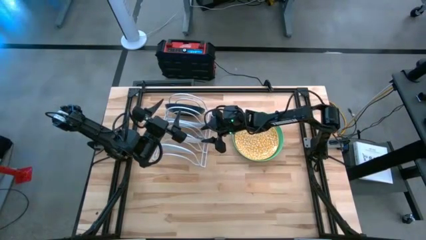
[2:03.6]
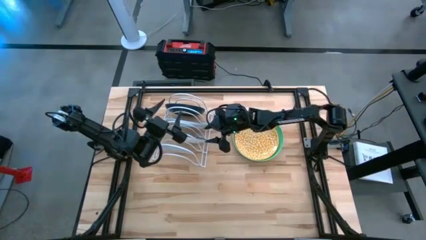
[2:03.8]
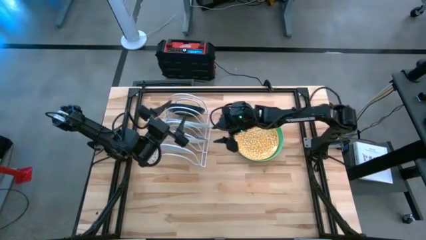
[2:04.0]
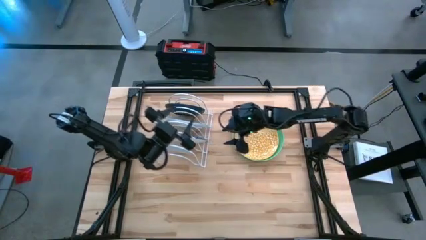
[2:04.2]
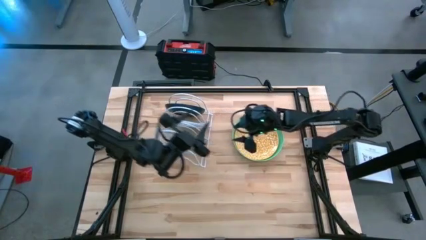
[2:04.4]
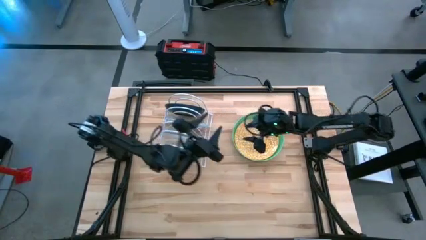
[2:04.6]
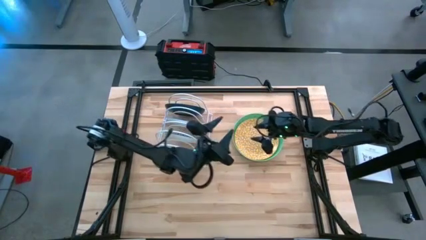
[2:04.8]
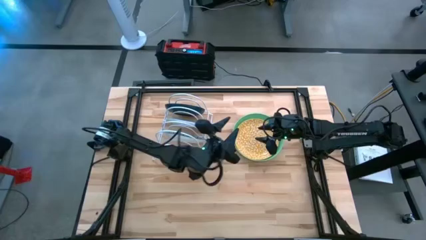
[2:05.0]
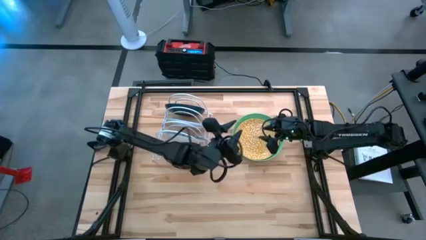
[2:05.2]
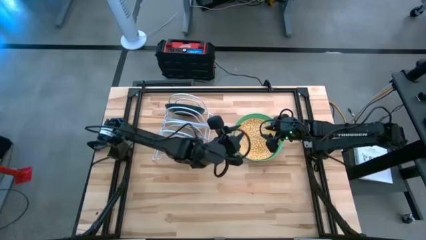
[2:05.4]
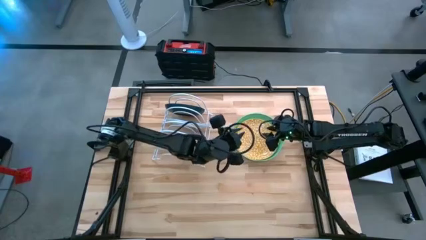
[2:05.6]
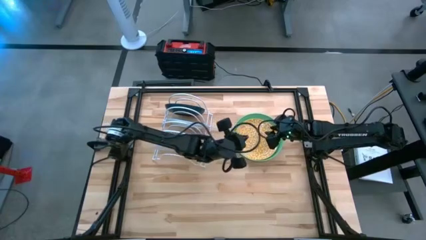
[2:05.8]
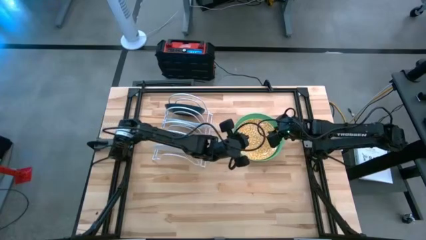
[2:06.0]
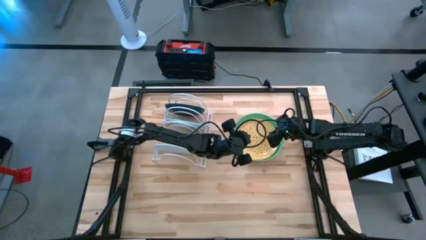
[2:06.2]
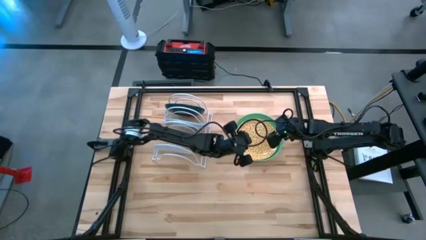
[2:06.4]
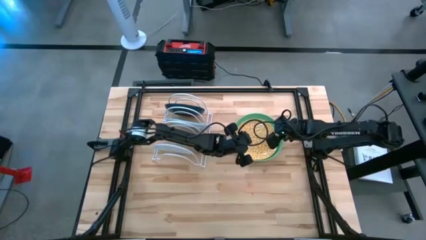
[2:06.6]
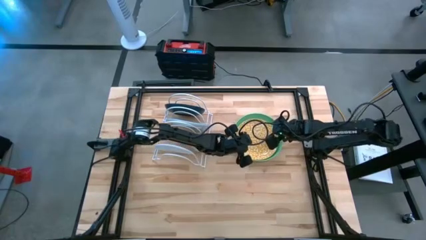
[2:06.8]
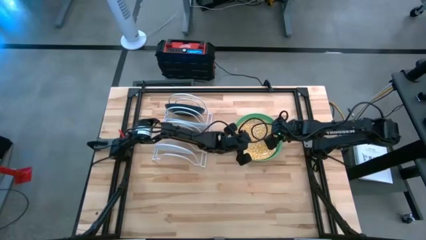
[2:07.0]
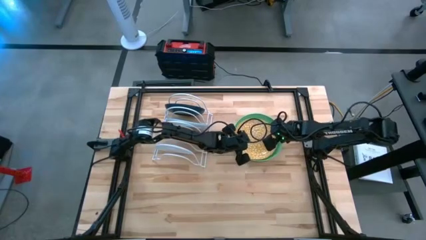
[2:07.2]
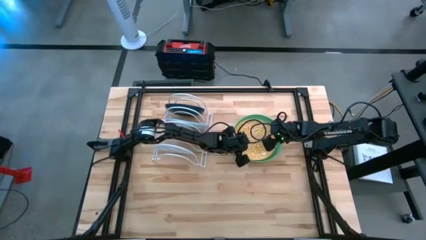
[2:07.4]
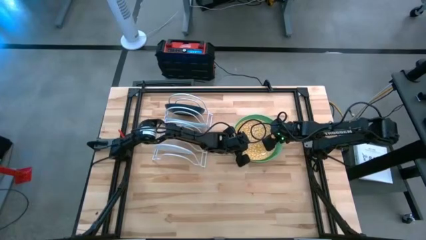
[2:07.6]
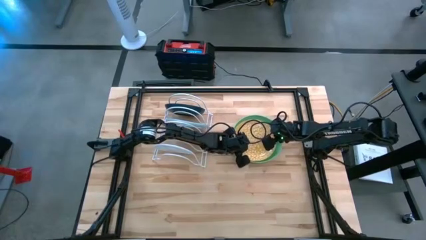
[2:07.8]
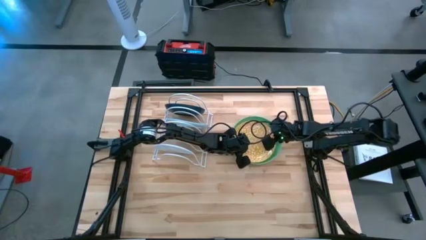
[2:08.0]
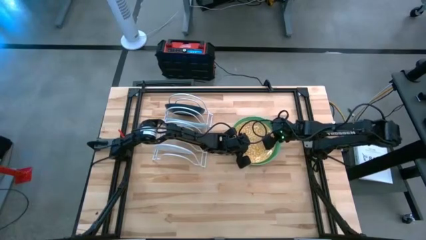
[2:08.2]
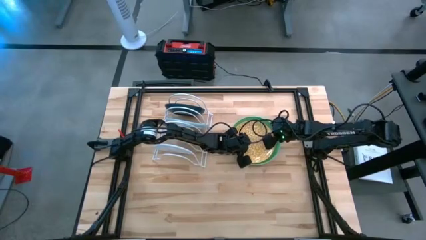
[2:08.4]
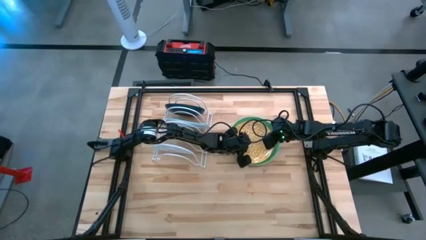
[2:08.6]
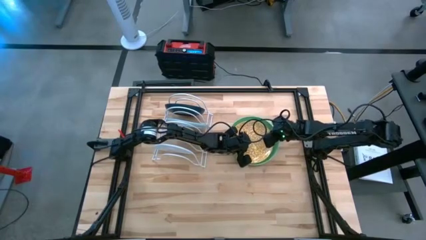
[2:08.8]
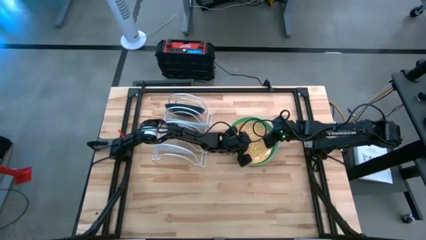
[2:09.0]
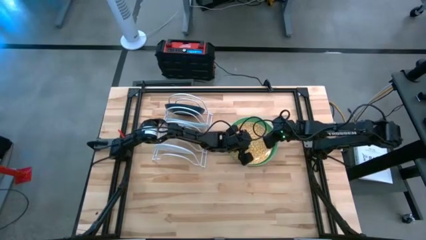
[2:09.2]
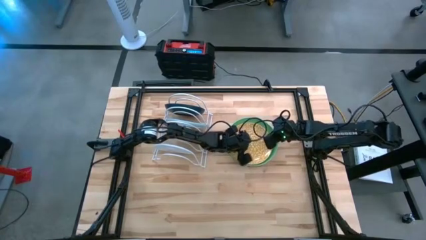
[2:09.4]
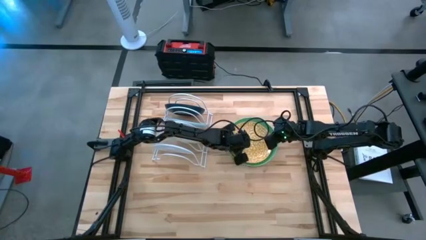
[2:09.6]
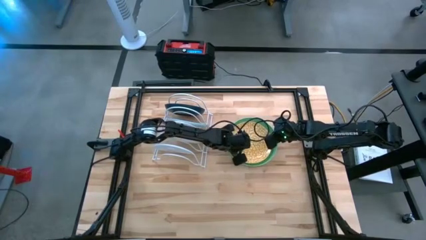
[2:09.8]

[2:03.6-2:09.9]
Task: Sort dishes
Put the yellow pattern plate in the dish rack

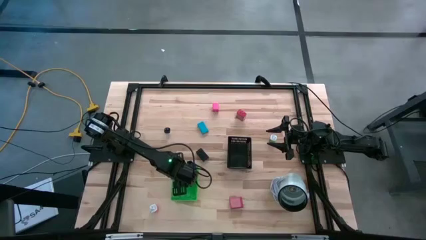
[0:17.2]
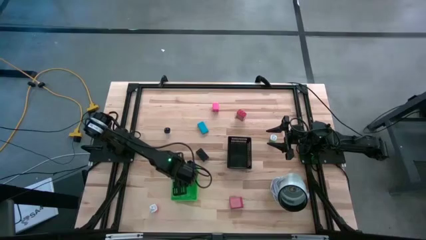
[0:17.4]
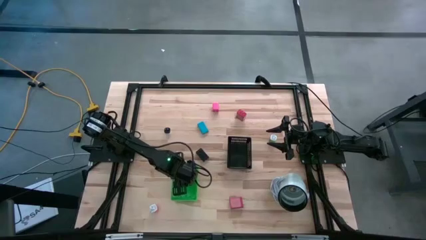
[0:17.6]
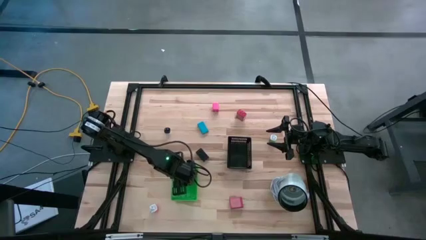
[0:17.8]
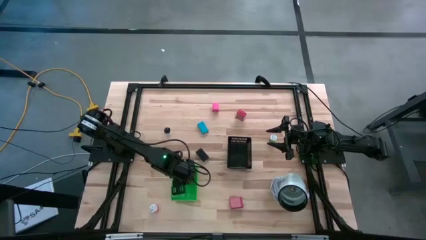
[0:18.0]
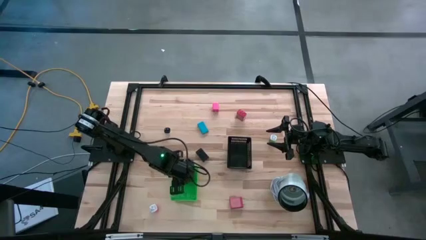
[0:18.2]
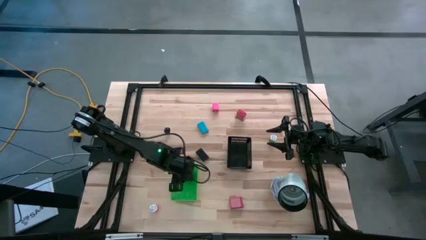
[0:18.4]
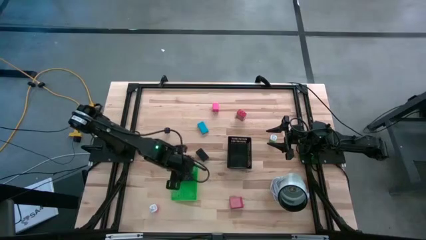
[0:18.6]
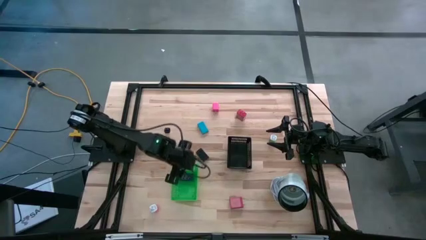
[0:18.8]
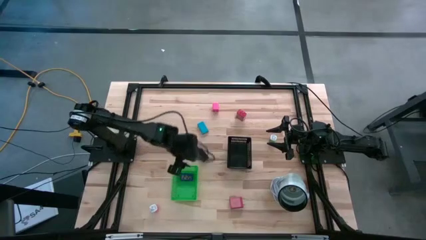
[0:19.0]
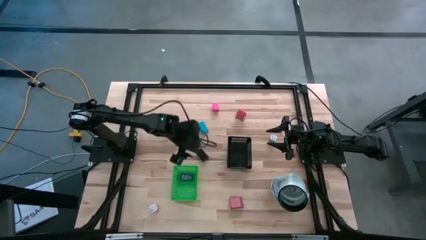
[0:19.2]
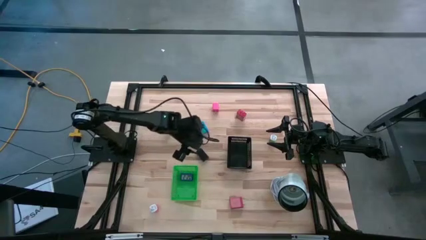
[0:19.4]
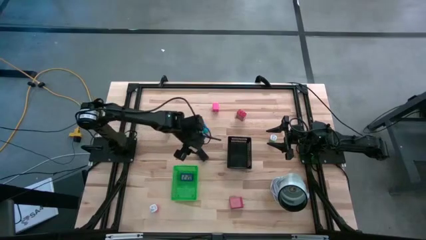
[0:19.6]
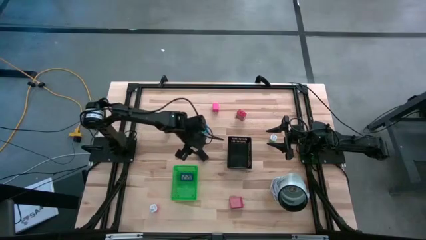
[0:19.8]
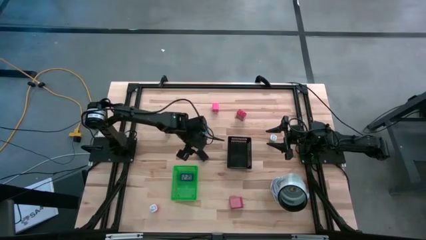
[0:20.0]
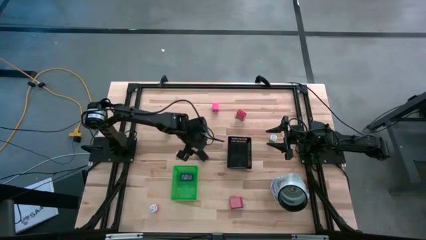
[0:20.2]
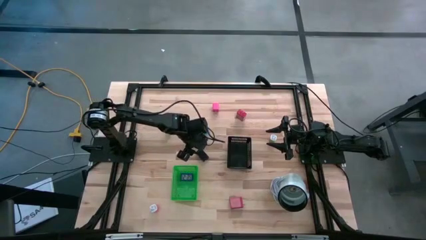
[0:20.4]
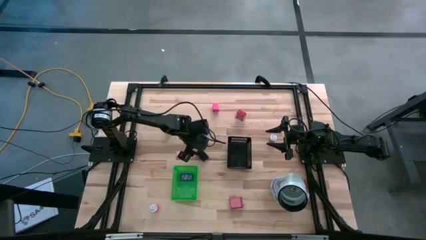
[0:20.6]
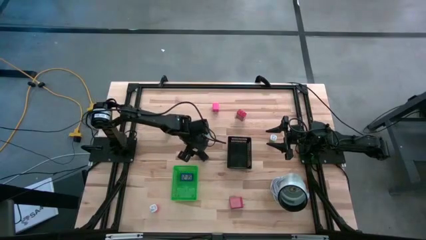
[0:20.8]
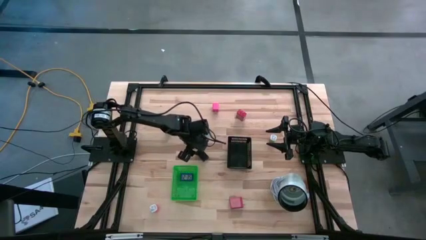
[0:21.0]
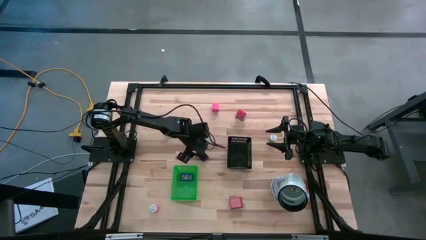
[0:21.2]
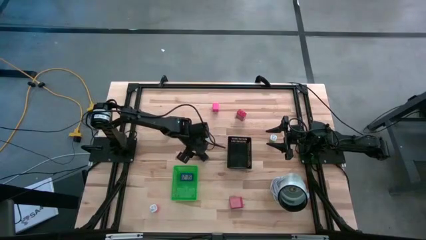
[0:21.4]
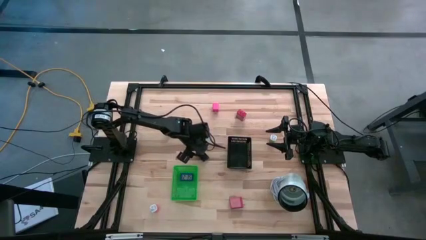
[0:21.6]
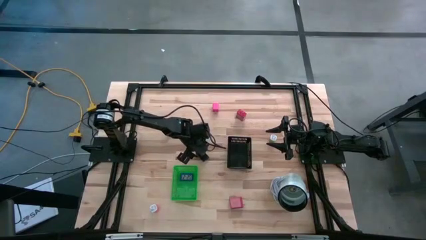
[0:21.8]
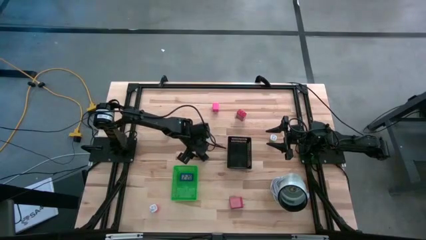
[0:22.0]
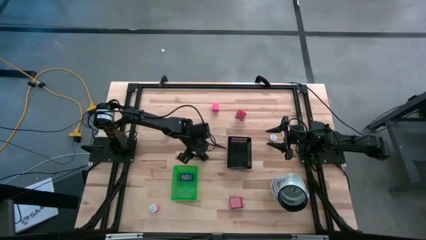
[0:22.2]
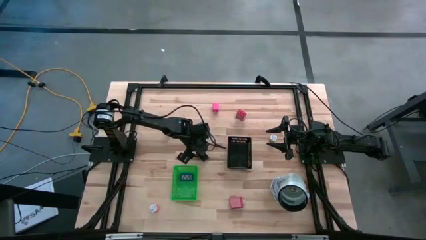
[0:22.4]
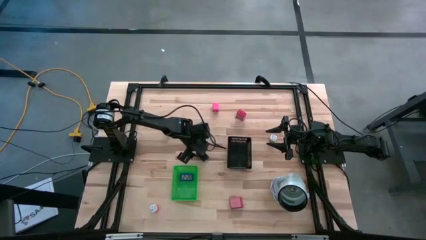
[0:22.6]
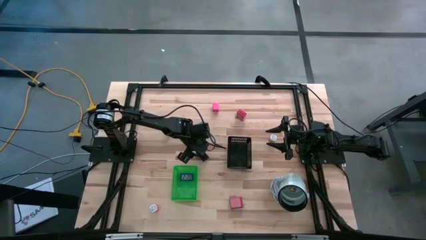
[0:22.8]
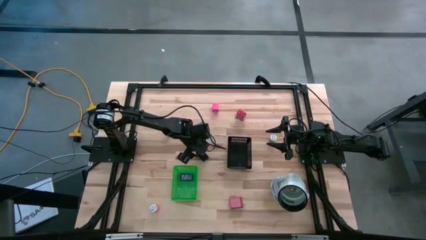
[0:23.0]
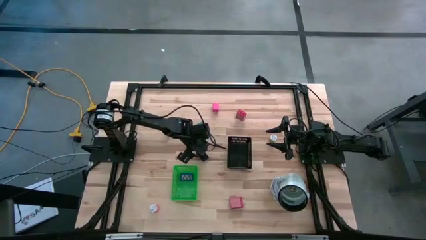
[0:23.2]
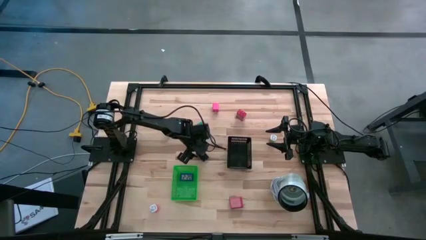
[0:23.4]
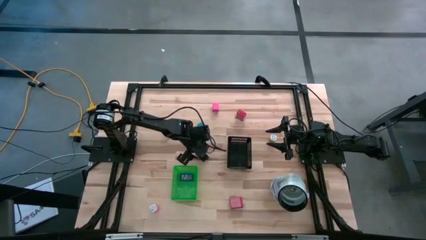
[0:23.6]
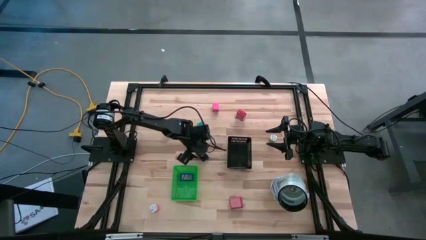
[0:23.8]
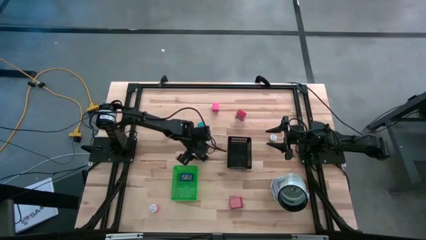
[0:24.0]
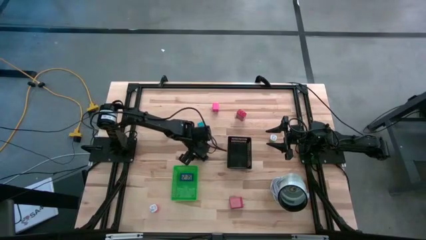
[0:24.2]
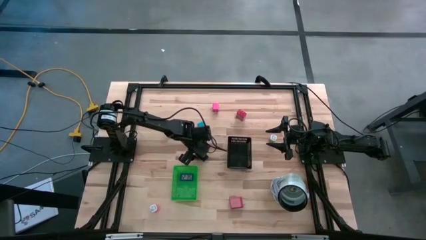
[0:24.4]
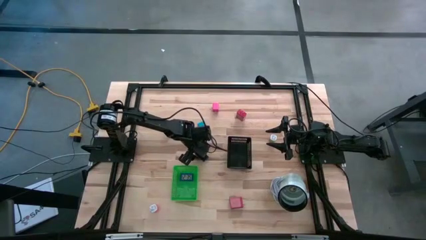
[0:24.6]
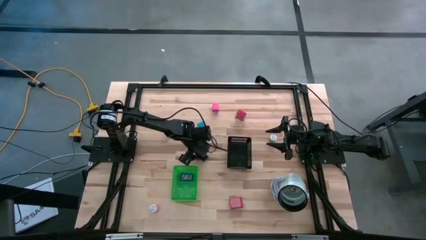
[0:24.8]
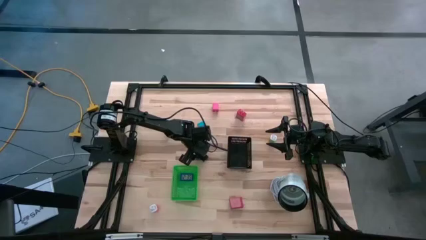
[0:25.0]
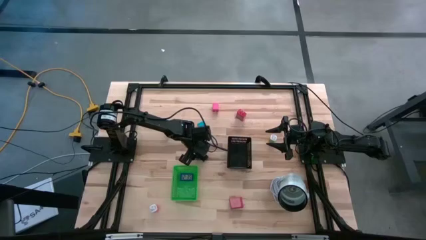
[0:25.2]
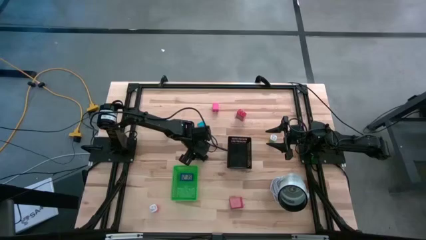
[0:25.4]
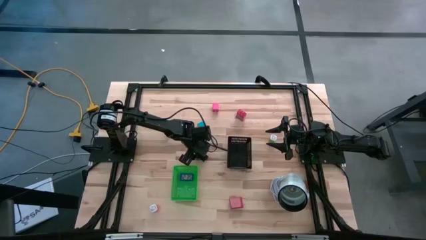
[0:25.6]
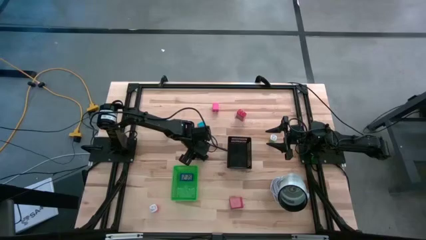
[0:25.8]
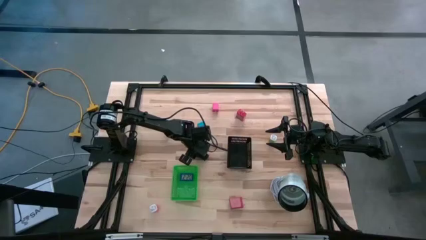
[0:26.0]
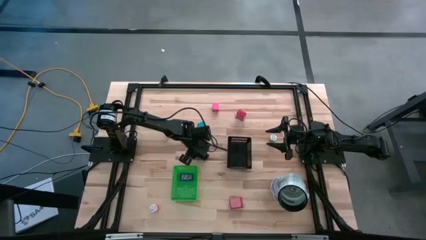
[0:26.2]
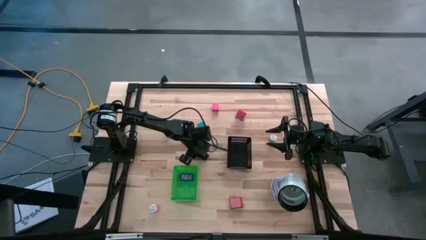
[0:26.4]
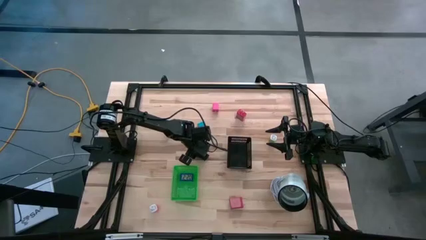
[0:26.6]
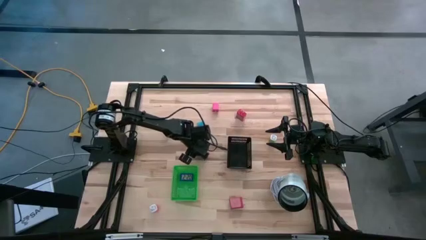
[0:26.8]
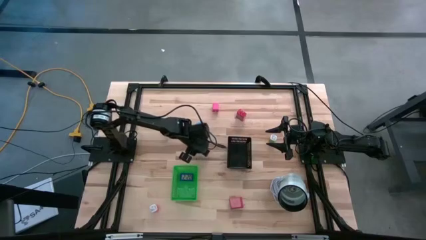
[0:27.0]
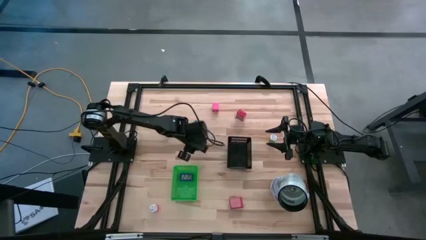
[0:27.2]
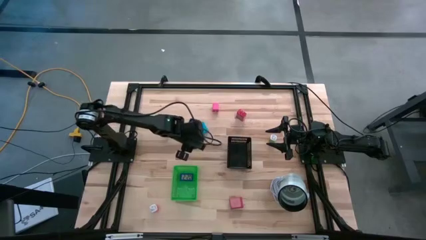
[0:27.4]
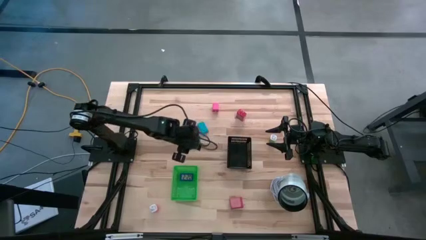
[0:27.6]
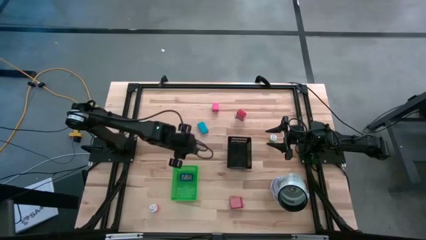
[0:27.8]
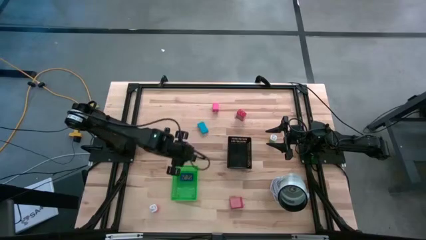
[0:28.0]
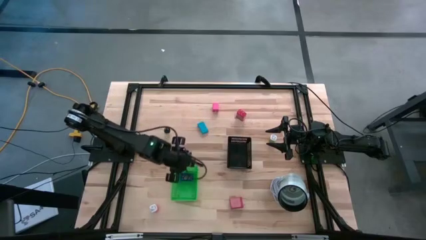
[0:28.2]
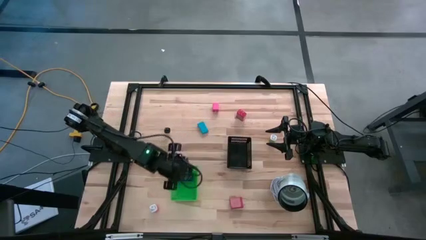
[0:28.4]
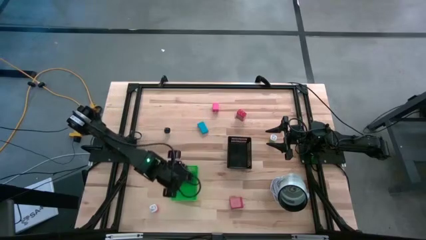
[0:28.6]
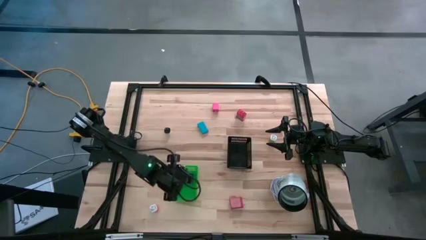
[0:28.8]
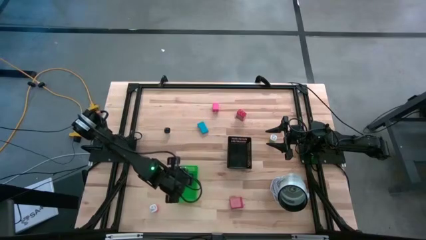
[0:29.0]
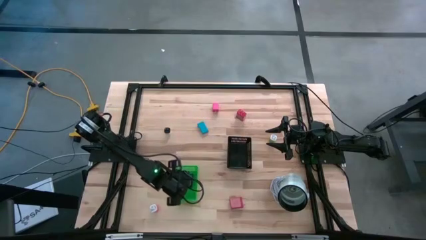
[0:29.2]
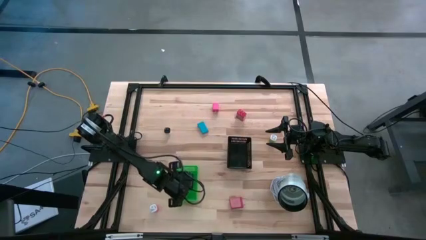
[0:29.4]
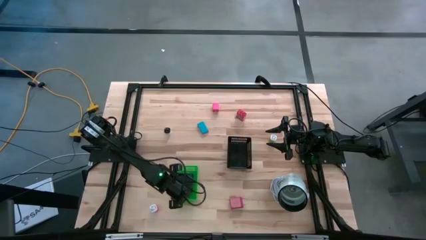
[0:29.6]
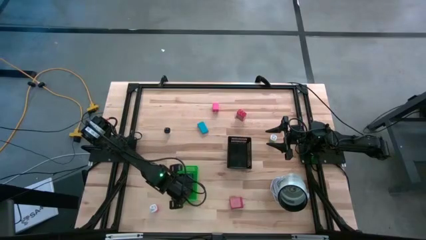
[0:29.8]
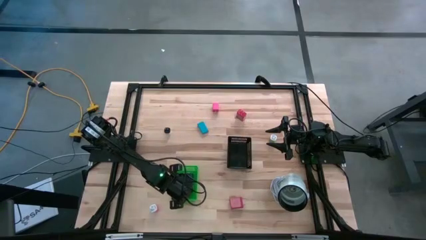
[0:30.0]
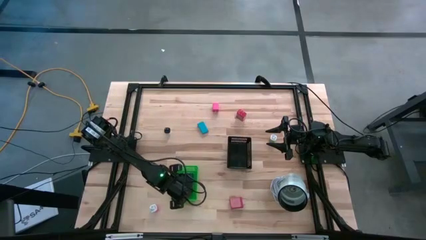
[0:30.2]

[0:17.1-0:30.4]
Task: Pick & Place Office items
Put the black digital clock into the green bin
